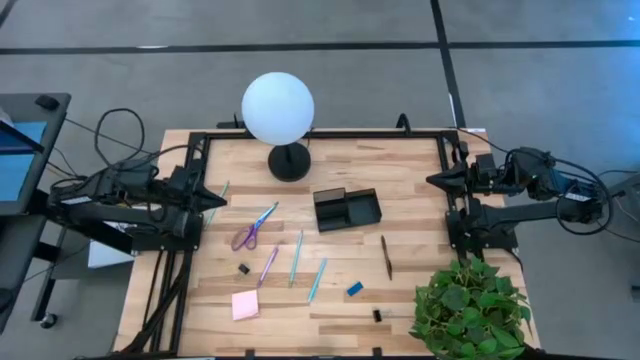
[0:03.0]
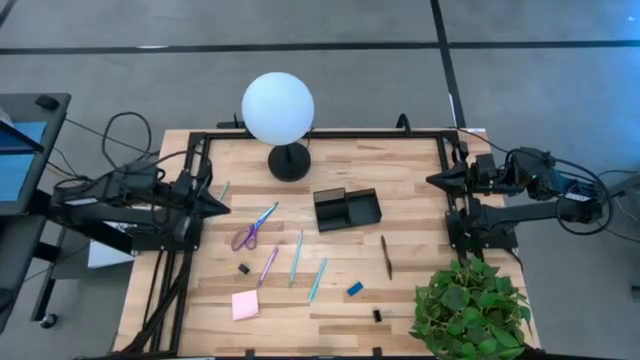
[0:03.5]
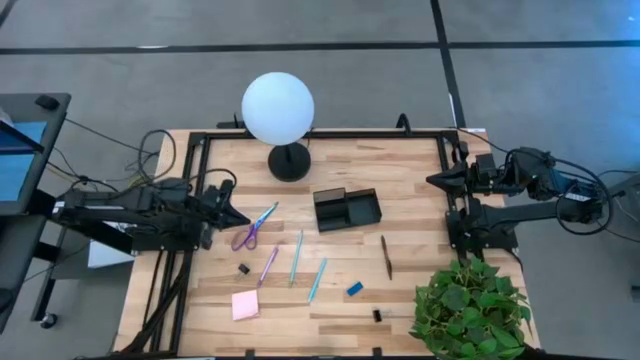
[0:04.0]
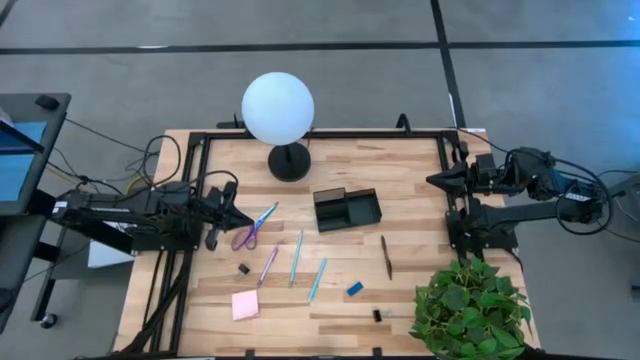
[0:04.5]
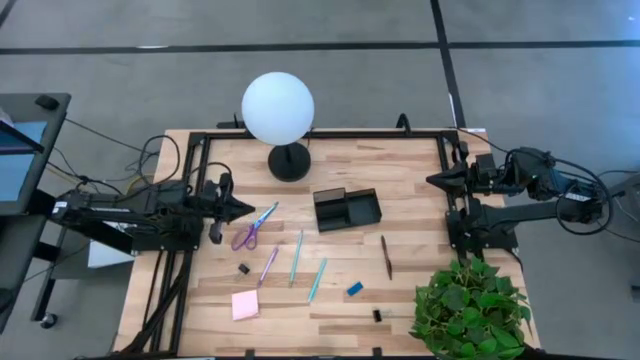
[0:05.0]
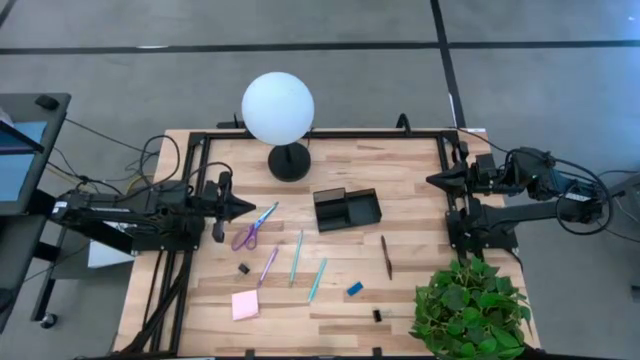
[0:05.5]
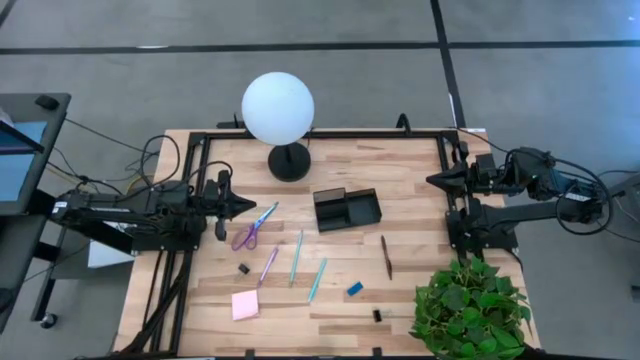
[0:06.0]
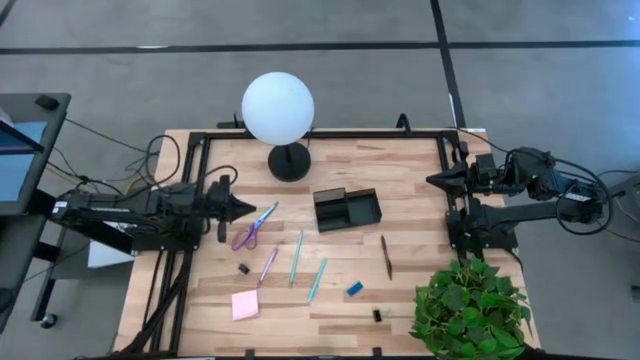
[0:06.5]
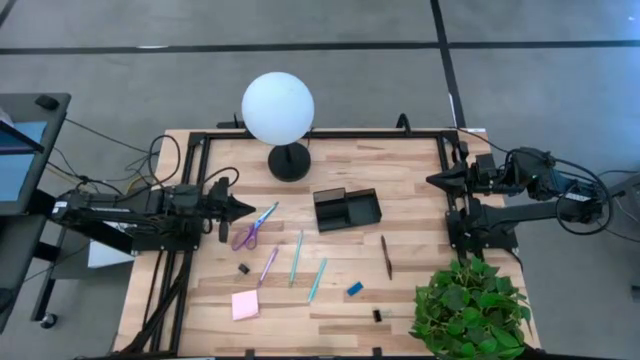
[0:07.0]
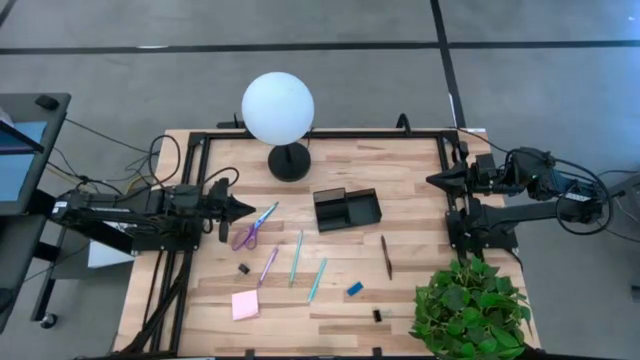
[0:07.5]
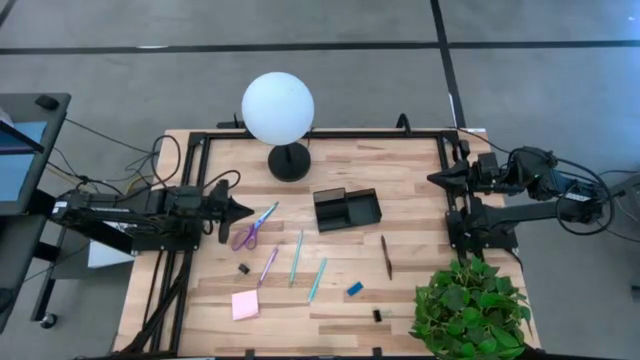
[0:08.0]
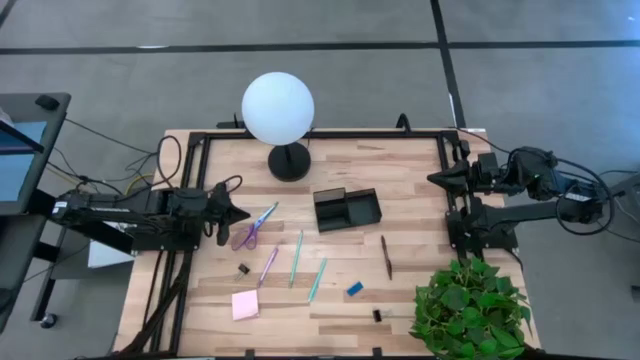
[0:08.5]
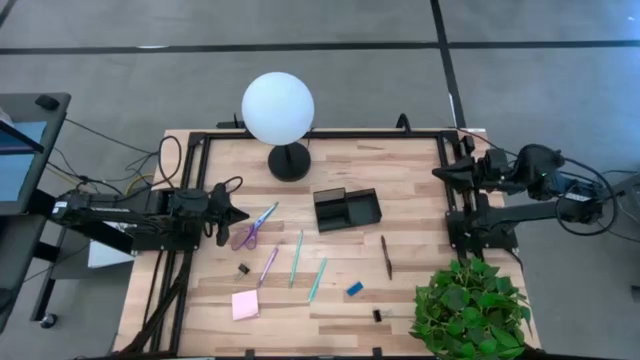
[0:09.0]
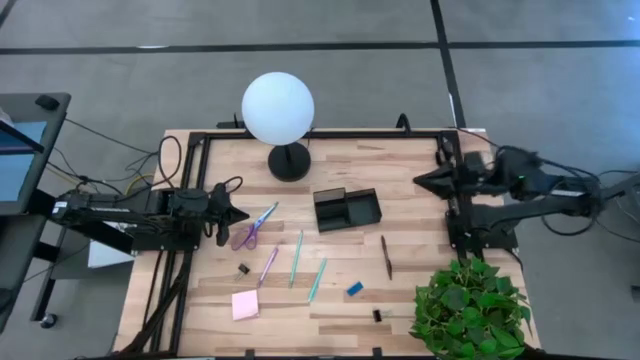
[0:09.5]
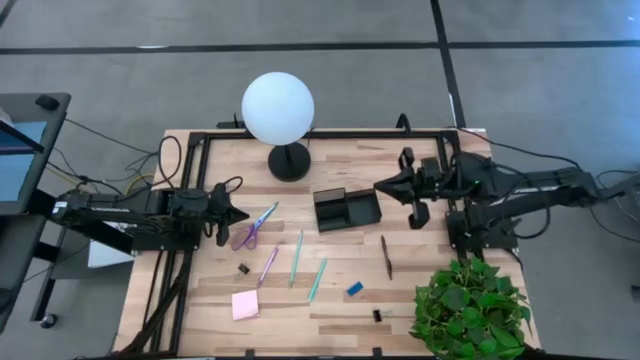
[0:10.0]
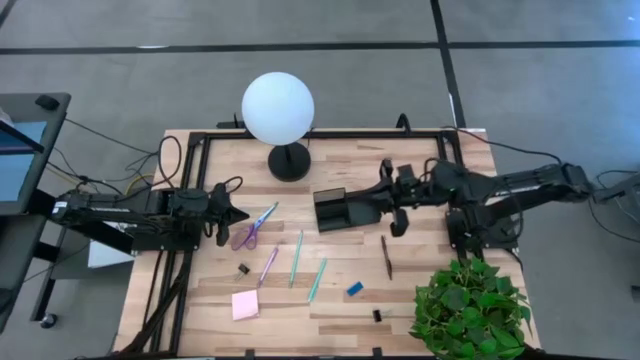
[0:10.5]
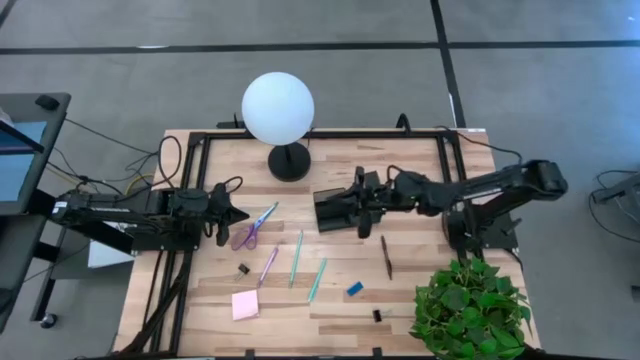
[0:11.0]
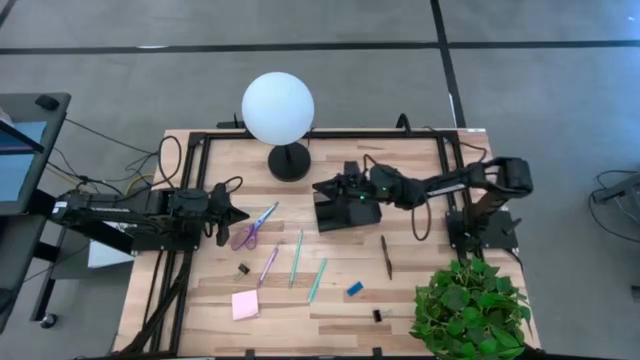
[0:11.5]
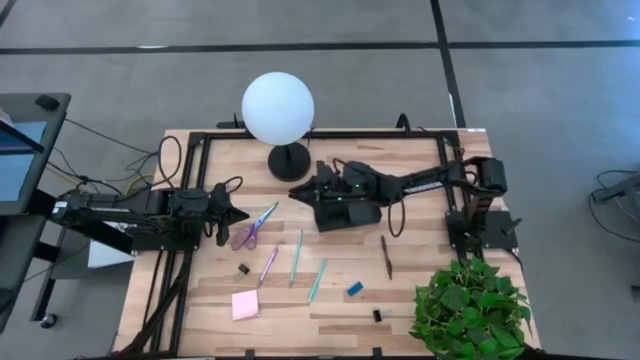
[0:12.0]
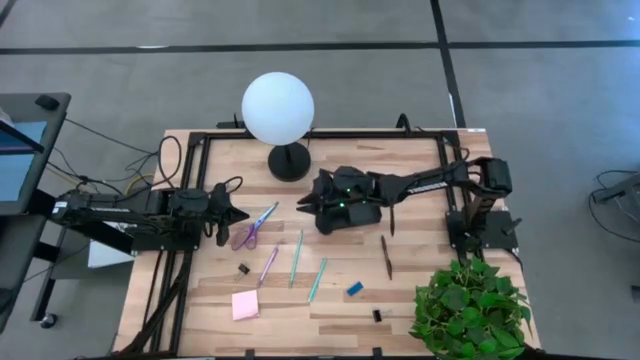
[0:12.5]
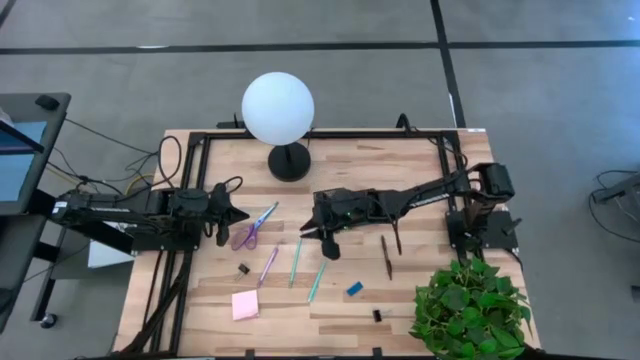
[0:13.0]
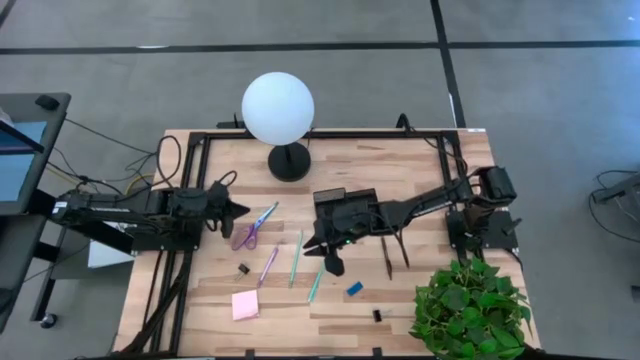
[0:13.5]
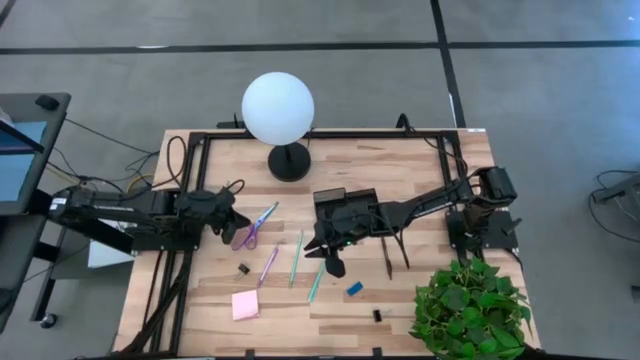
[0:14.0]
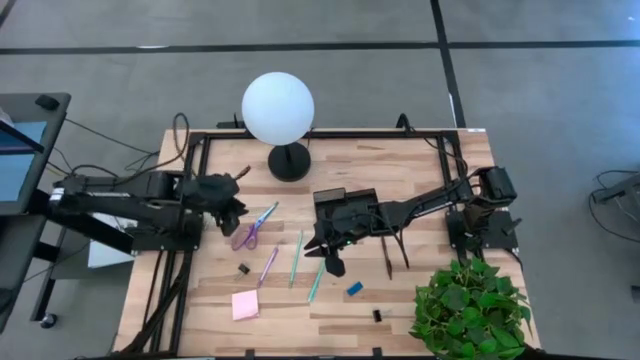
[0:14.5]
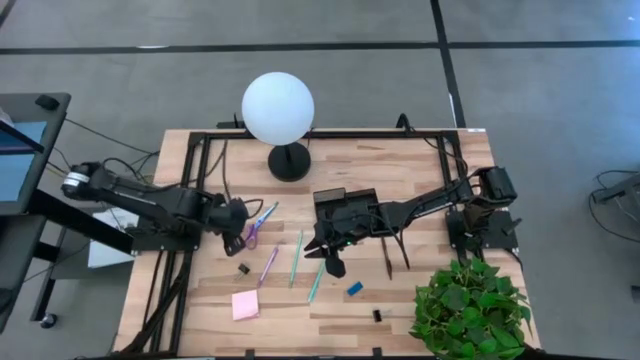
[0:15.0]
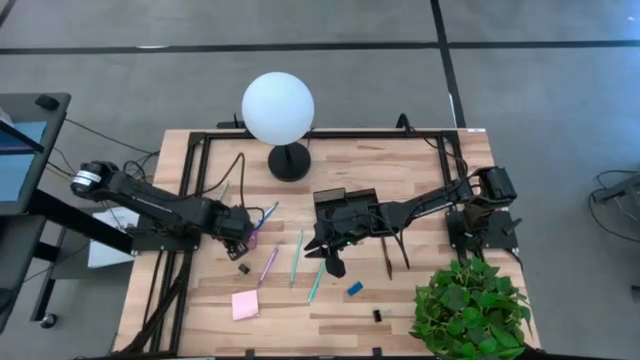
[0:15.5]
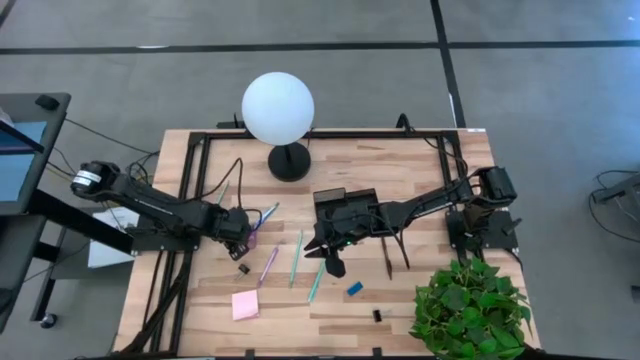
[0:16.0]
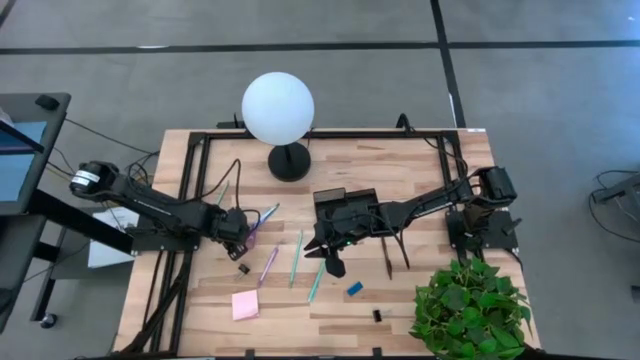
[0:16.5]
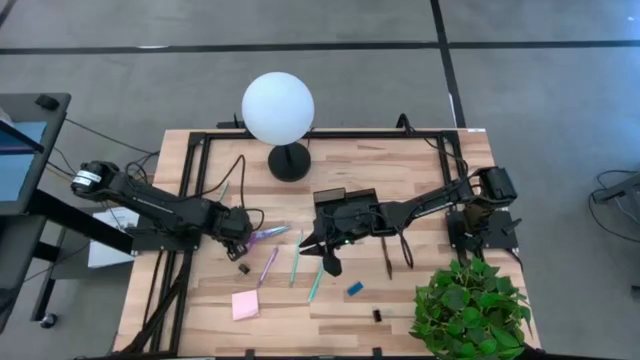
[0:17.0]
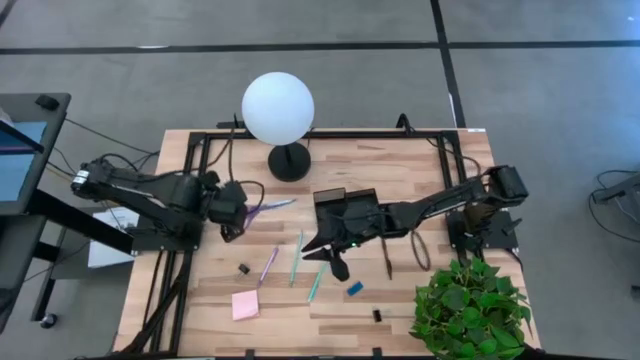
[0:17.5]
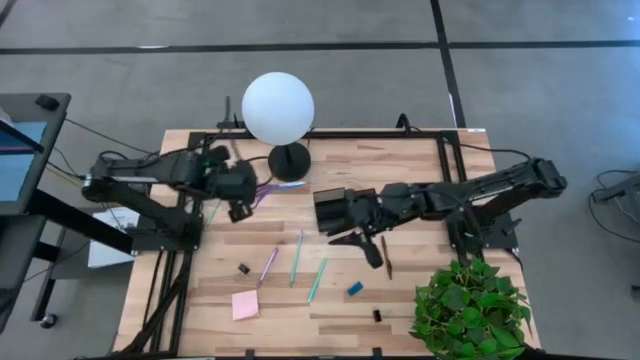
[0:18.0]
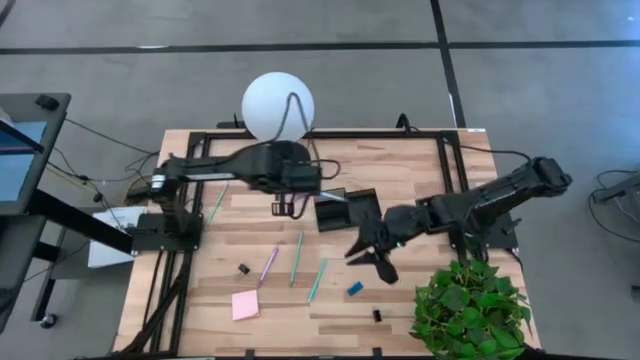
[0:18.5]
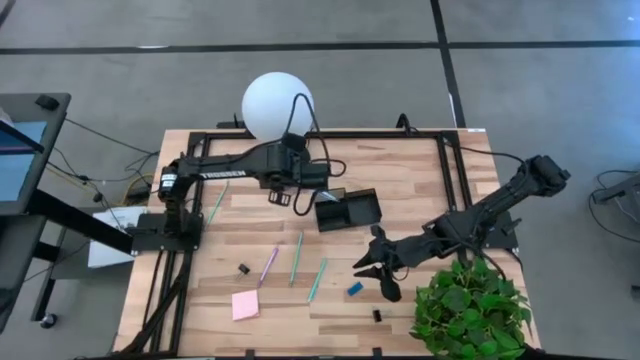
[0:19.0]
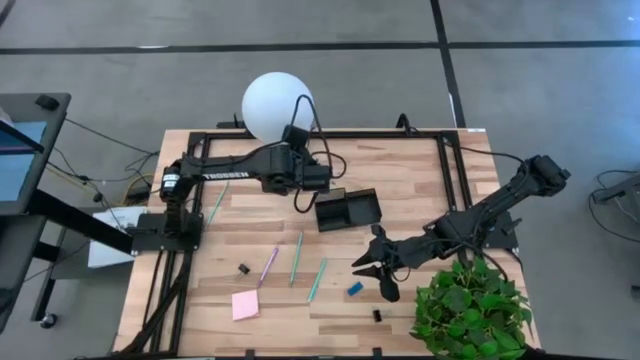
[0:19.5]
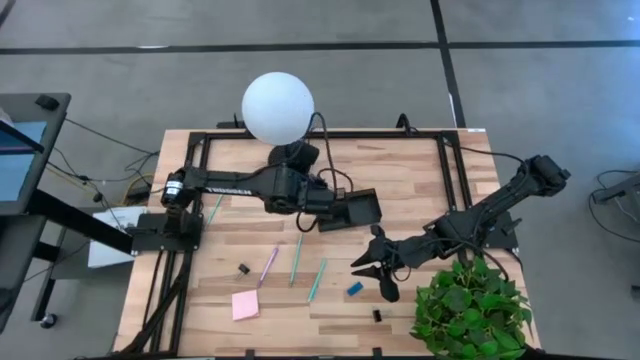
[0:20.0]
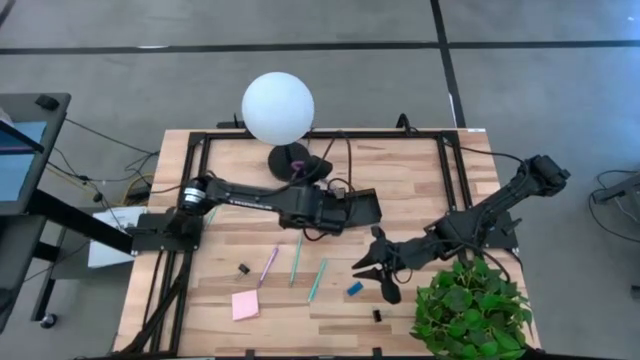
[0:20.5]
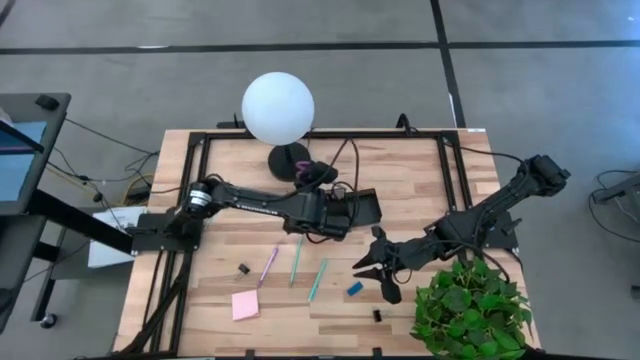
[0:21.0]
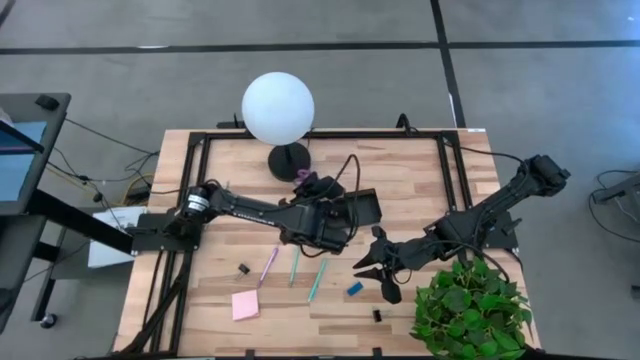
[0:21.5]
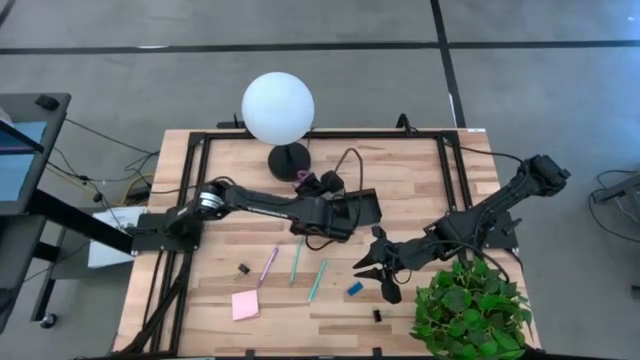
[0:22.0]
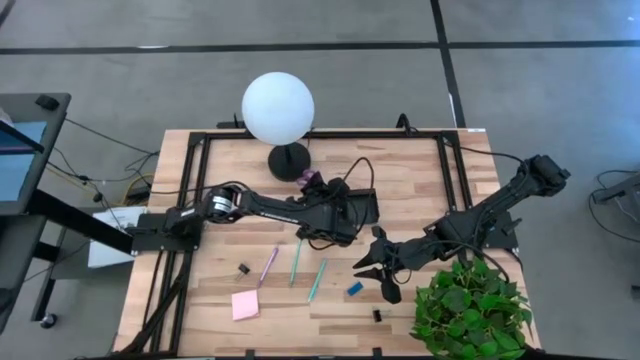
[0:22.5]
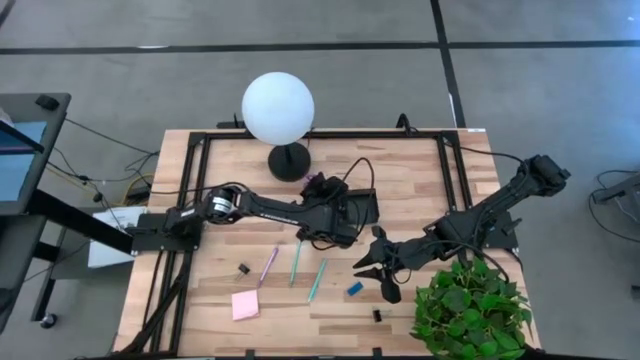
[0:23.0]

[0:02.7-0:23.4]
Task: Pick and place office supplies into organizer
Put the purple scissors into the black desk organizer
